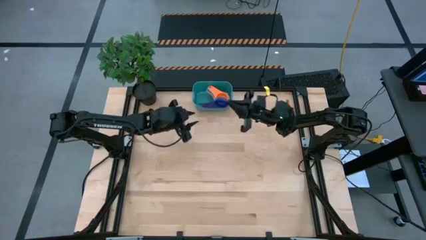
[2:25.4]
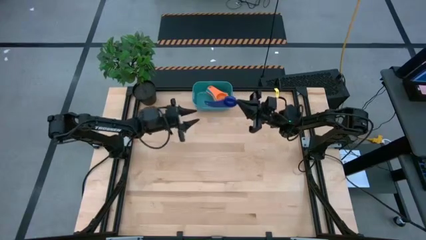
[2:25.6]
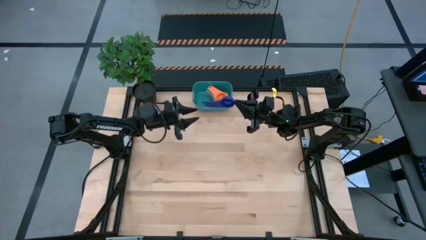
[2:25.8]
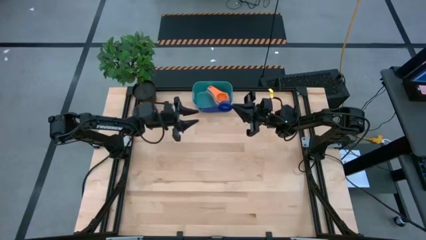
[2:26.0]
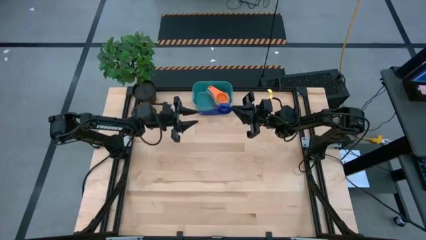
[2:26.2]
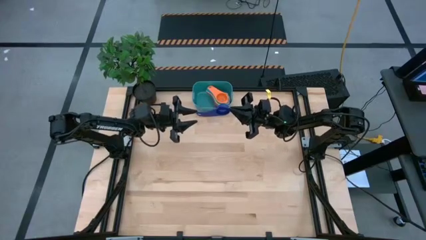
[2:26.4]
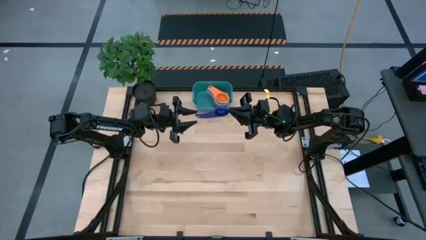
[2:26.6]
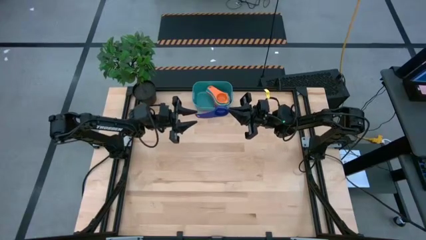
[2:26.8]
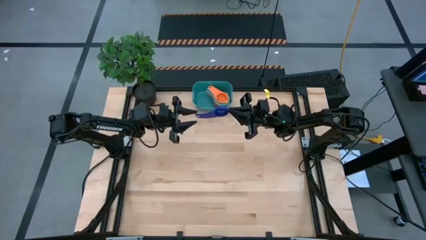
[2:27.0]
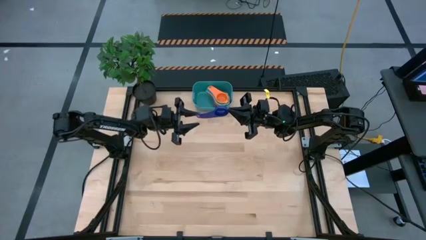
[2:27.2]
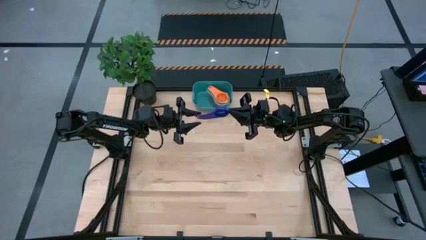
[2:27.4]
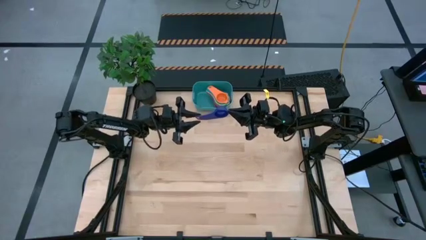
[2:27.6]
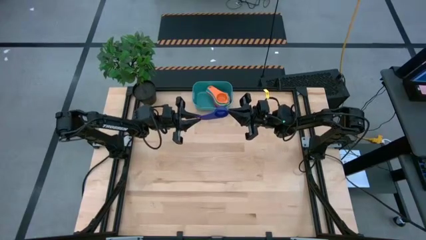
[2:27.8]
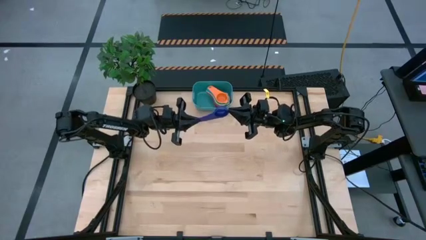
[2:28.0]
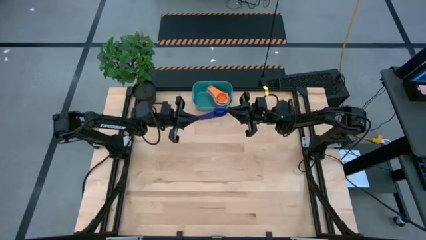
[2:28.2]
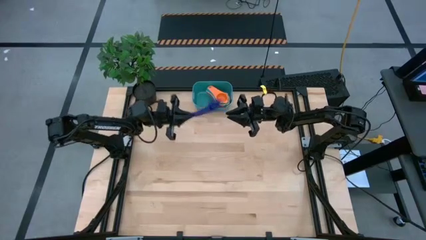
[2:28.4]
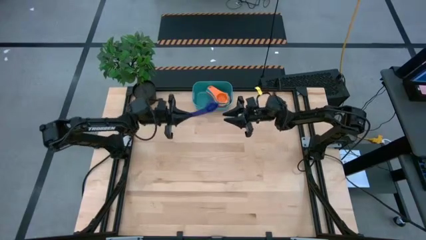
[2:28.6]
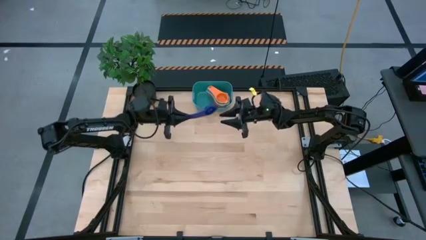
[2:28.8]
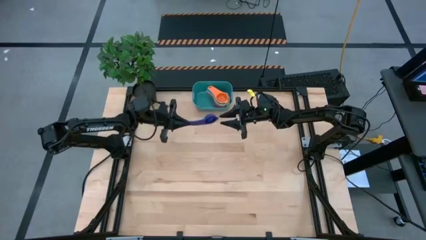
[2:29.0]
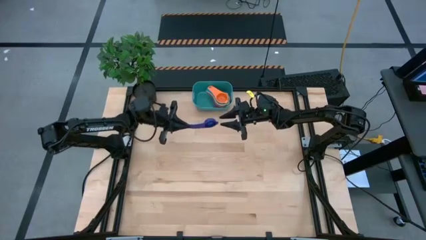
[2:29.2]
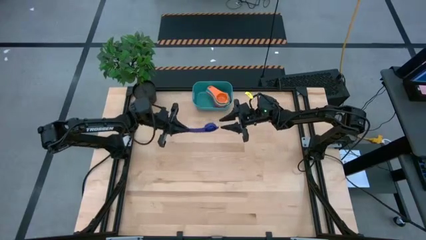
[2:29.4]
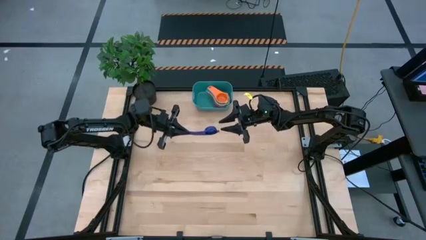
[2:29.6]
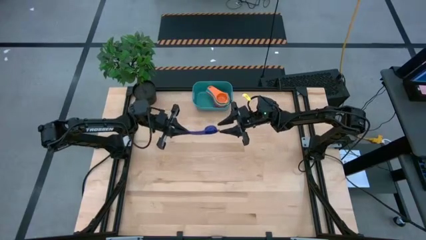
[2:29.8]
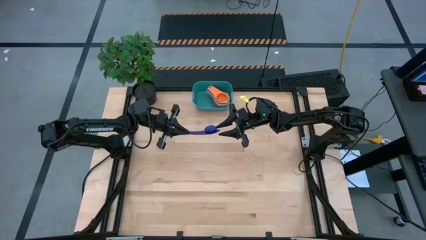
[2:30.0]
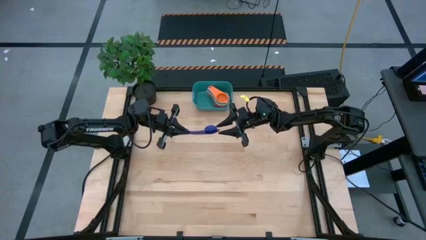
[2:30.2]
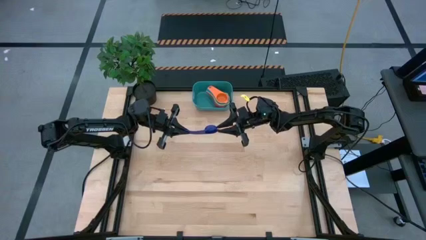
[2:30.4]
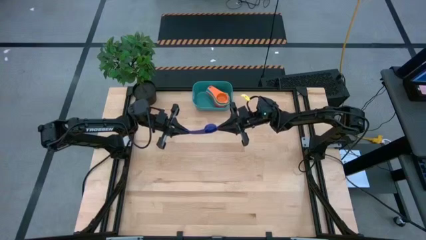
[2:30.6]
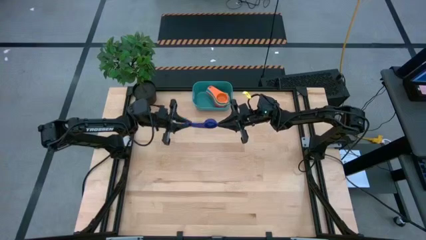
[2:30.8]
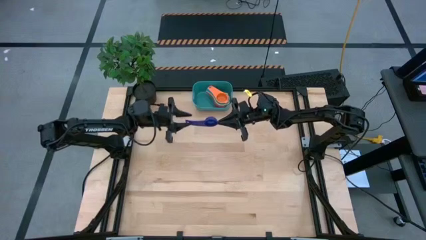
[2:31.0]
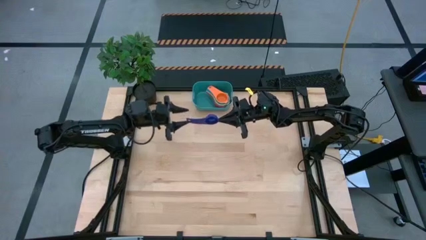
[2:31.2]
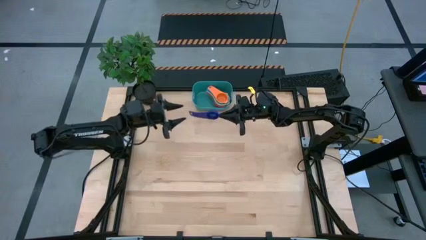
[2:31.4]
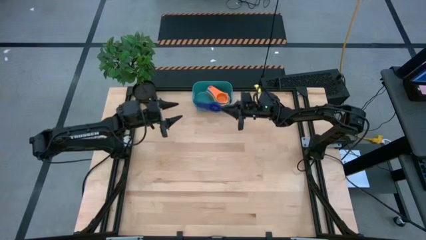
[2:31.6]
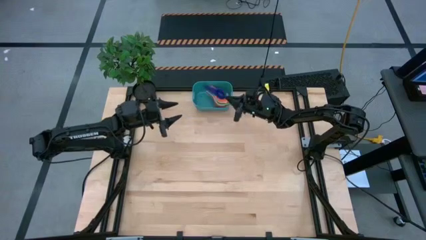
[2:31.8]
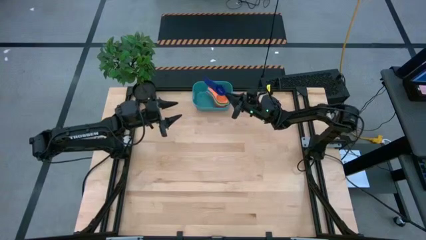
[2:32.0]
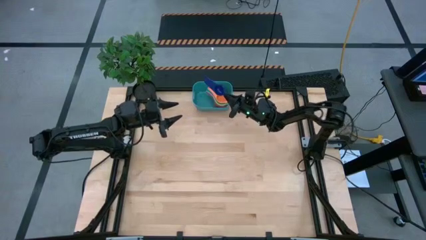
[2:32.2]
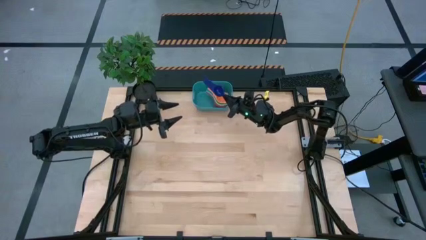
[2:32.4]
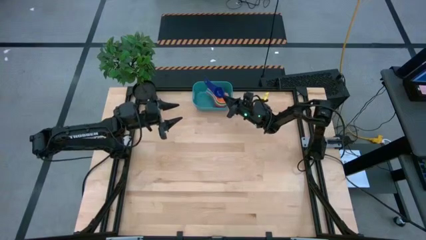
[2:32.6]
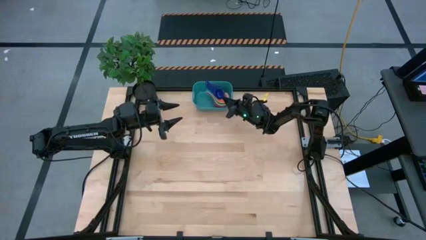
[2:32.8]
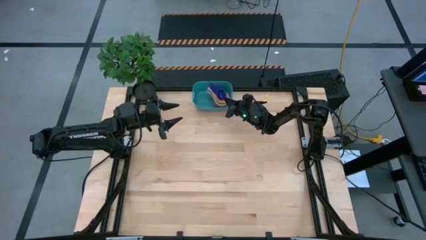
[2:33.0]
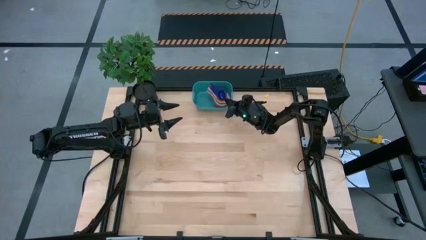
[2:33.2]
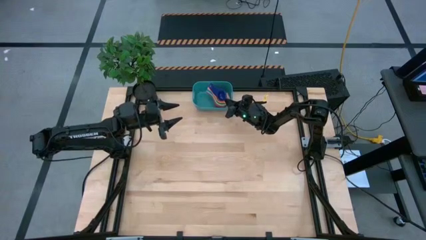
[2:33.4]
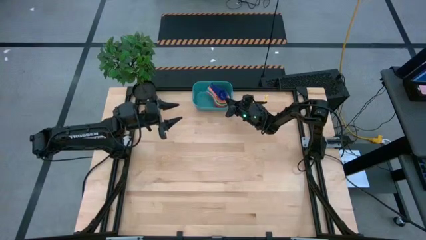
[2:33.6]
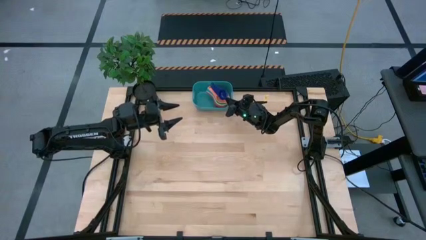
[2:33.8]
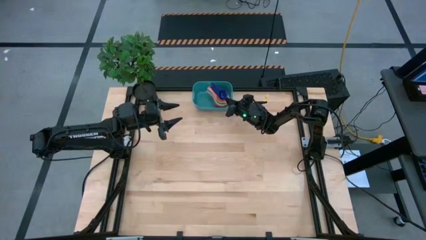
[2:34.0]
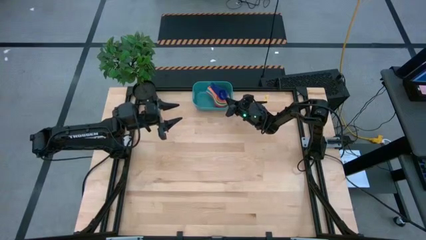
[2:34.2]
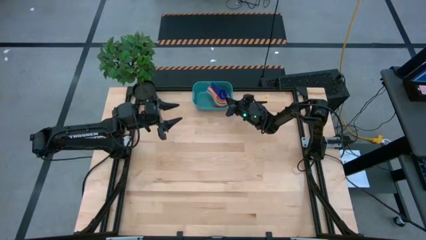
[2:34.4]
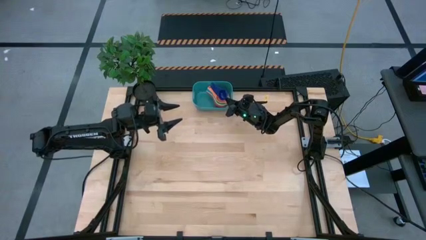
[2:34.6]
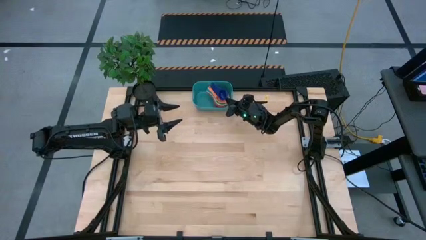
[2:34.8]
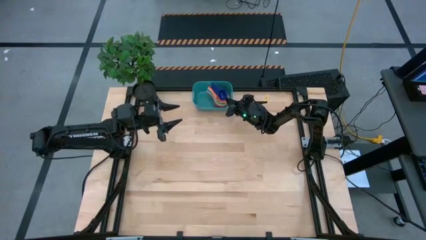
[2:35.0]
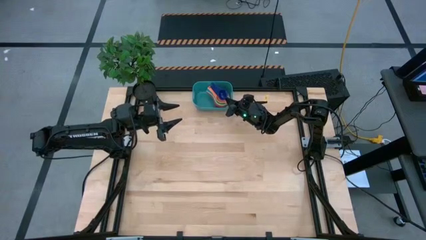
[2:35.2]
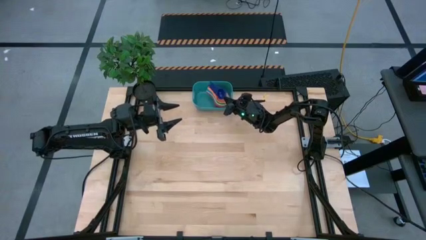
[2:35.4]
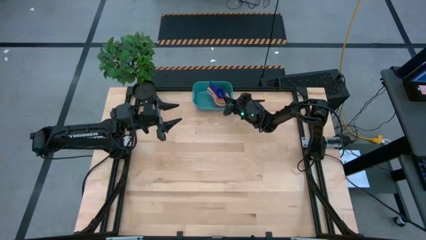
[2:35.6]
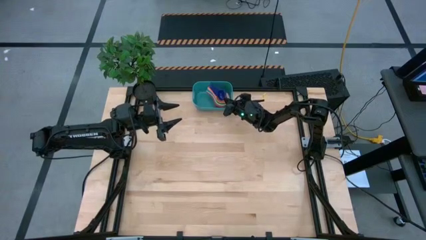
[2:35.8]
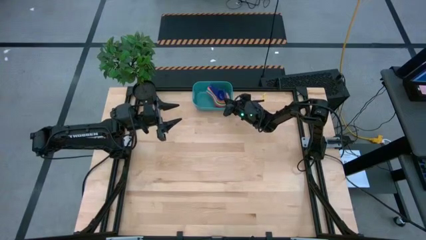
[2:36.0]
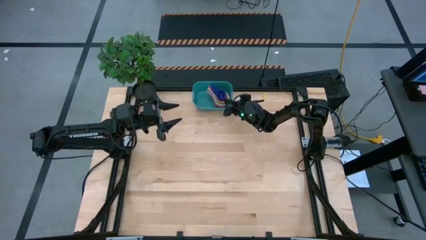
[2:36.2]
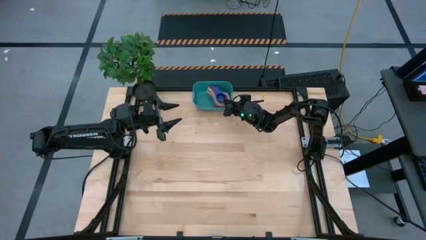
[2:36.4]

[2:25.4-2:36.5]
Task: Nest measuring cups in basket
Stack the dark blue measuring cup on top of the orange measuring cup in the blue bin
